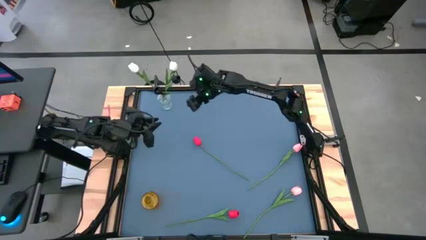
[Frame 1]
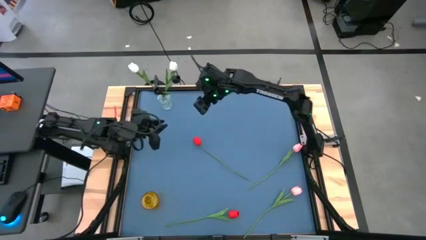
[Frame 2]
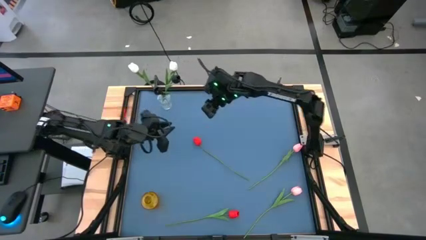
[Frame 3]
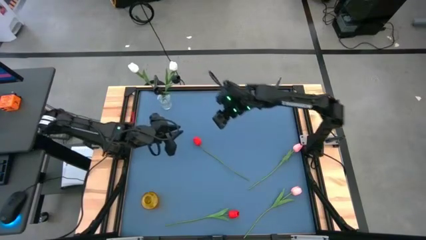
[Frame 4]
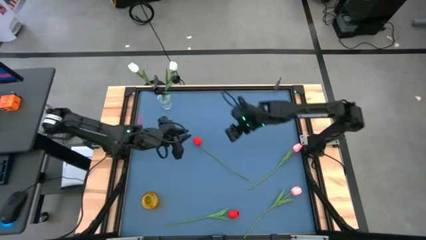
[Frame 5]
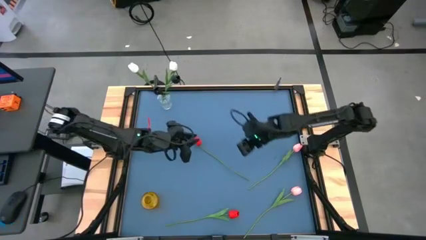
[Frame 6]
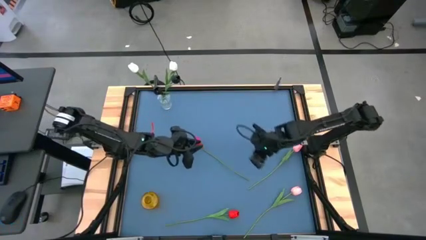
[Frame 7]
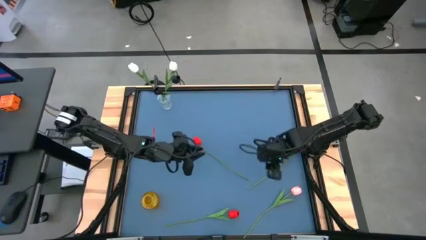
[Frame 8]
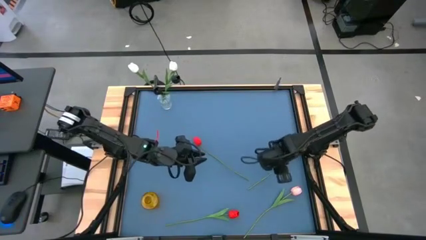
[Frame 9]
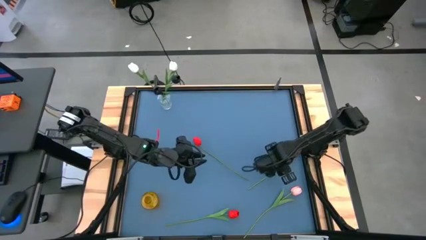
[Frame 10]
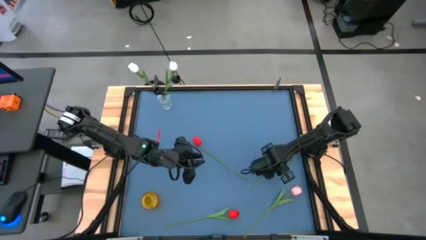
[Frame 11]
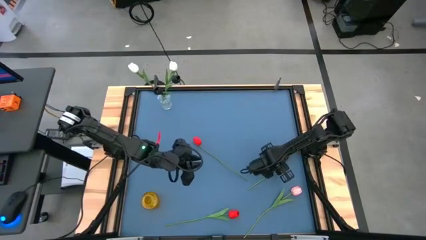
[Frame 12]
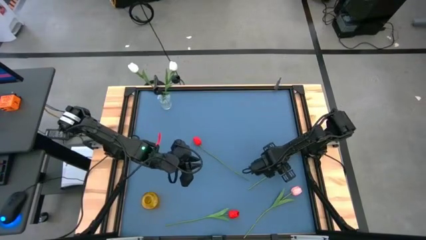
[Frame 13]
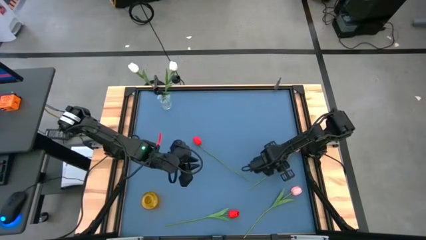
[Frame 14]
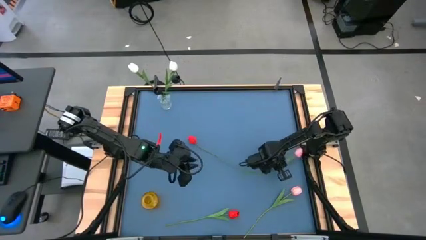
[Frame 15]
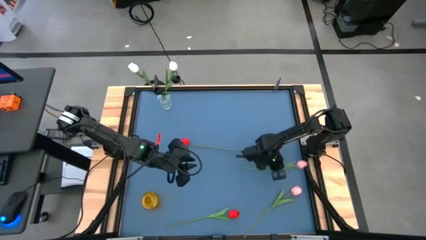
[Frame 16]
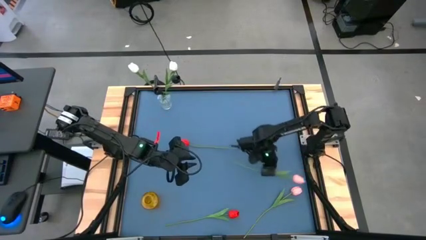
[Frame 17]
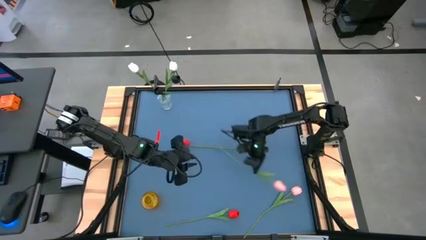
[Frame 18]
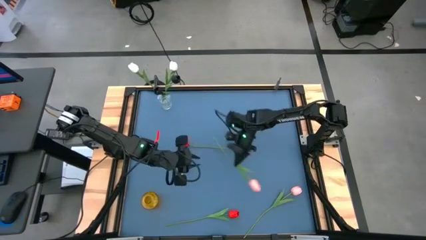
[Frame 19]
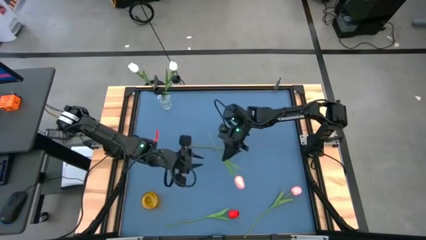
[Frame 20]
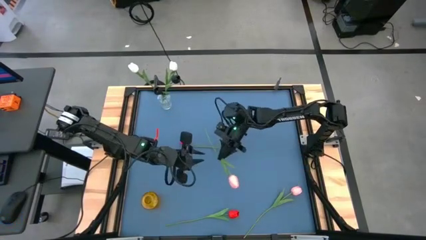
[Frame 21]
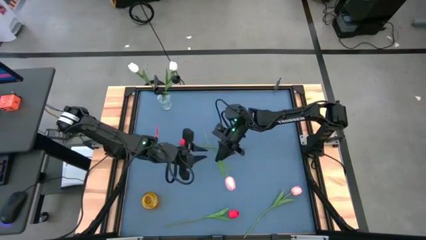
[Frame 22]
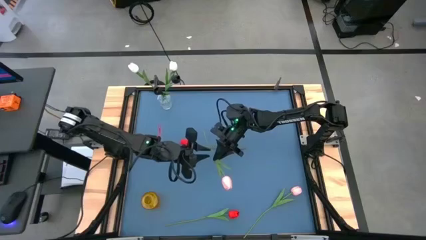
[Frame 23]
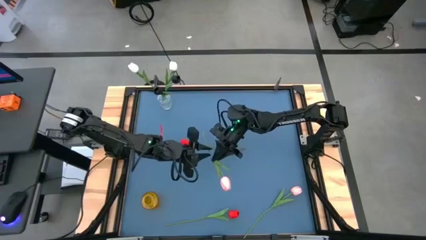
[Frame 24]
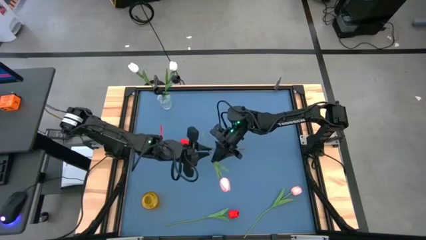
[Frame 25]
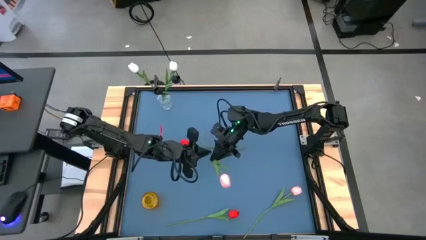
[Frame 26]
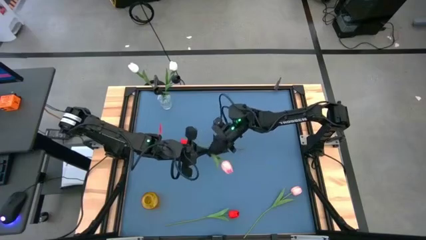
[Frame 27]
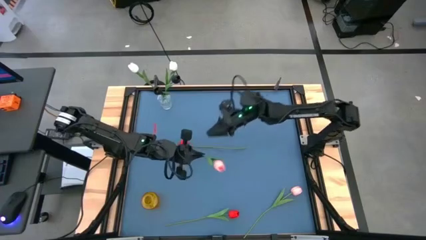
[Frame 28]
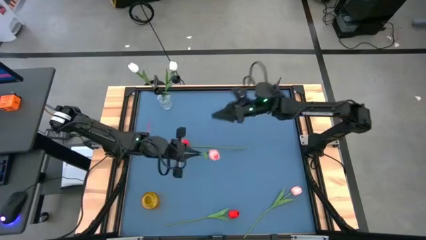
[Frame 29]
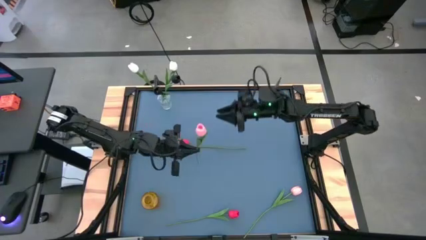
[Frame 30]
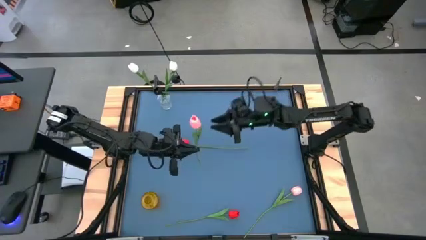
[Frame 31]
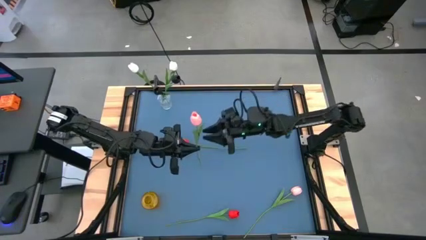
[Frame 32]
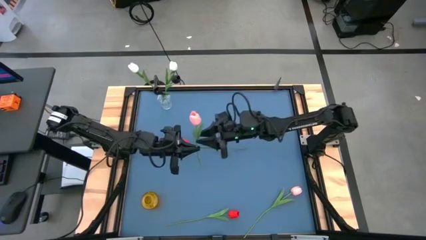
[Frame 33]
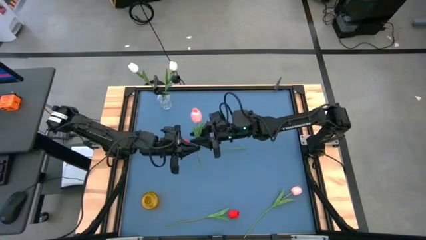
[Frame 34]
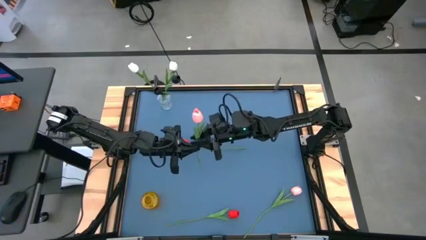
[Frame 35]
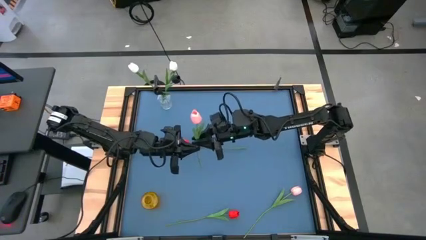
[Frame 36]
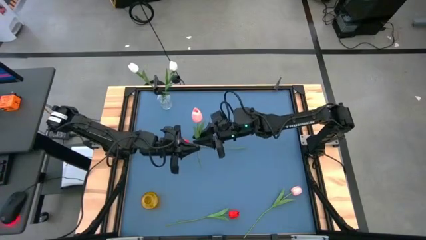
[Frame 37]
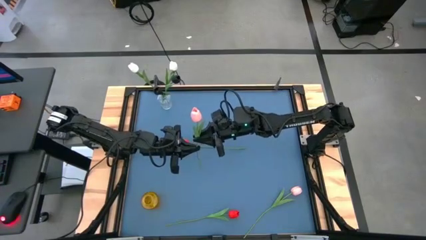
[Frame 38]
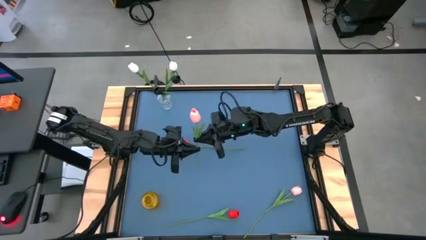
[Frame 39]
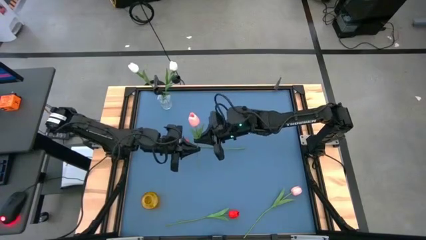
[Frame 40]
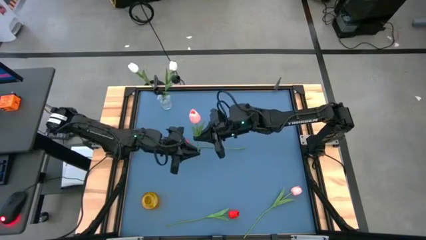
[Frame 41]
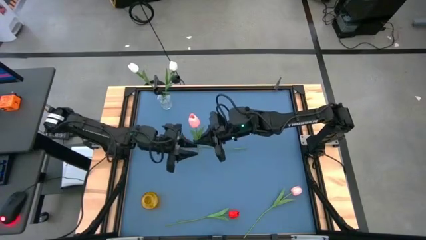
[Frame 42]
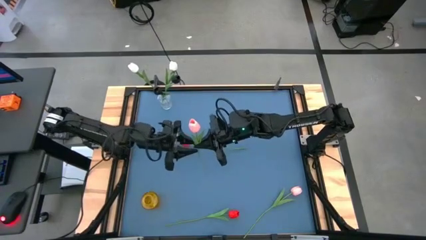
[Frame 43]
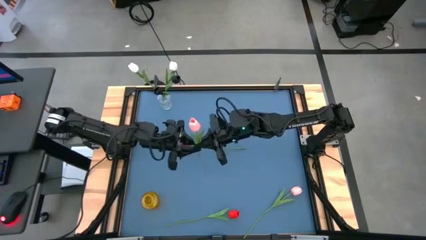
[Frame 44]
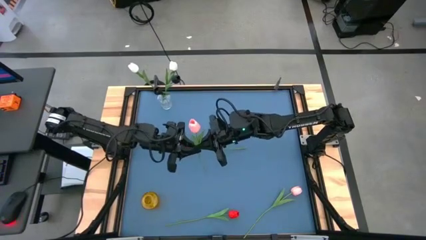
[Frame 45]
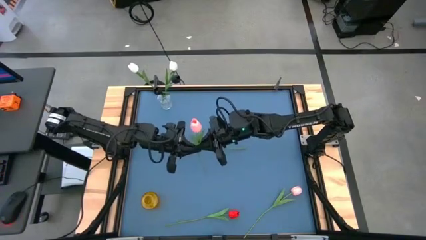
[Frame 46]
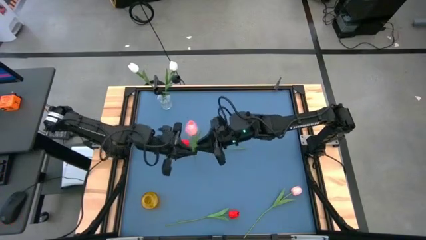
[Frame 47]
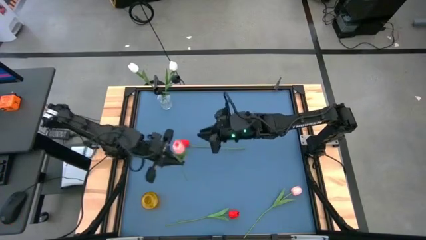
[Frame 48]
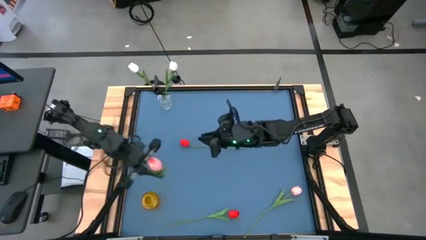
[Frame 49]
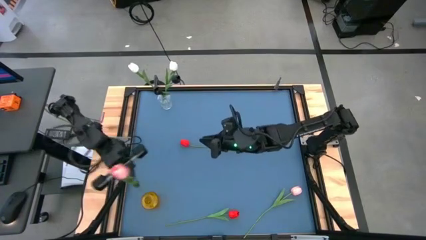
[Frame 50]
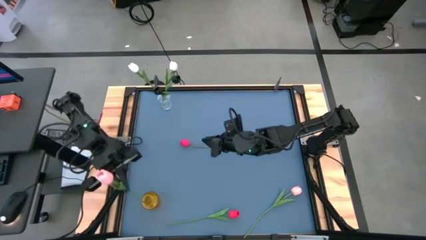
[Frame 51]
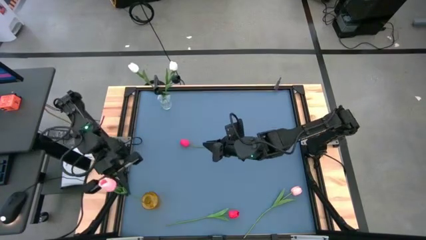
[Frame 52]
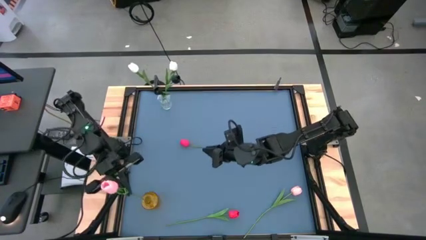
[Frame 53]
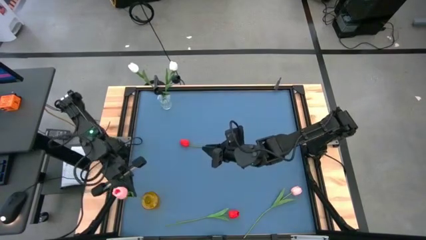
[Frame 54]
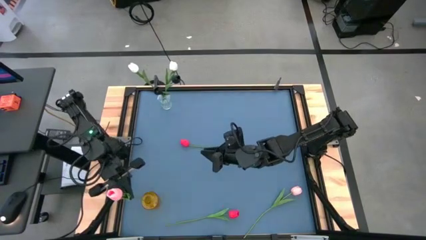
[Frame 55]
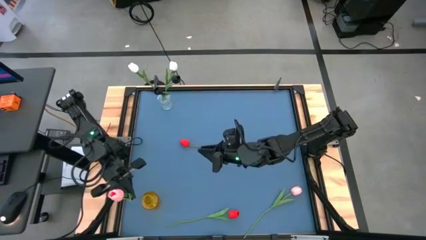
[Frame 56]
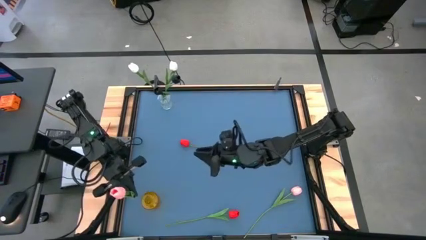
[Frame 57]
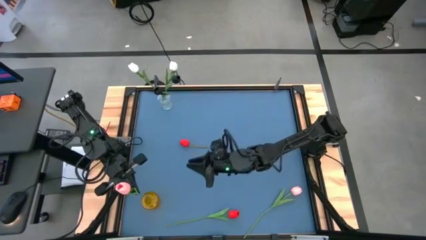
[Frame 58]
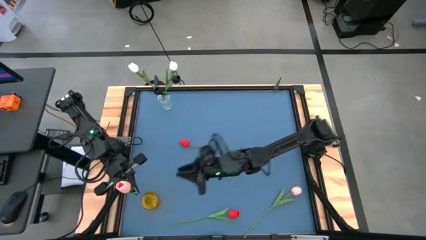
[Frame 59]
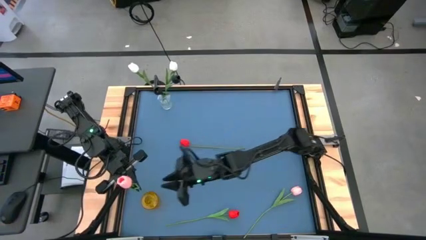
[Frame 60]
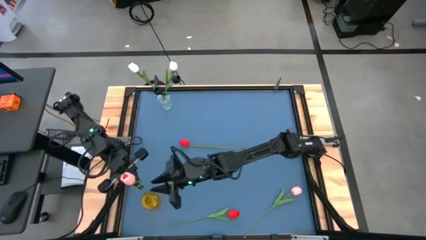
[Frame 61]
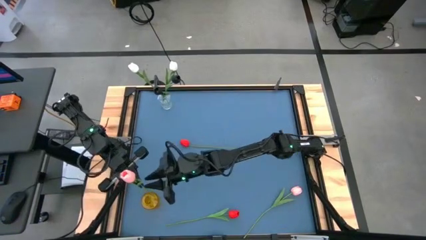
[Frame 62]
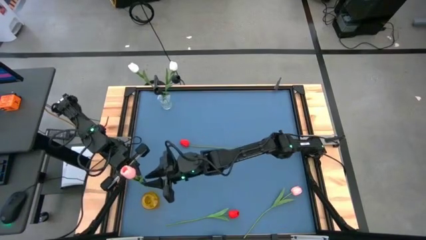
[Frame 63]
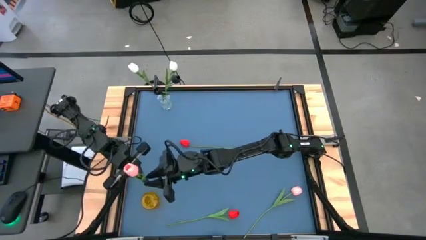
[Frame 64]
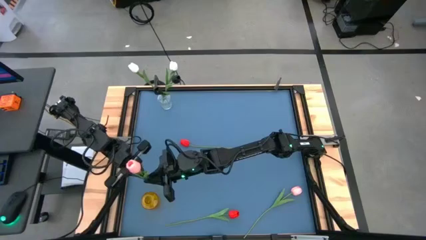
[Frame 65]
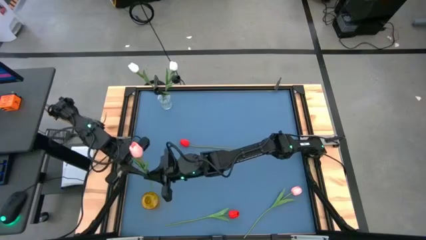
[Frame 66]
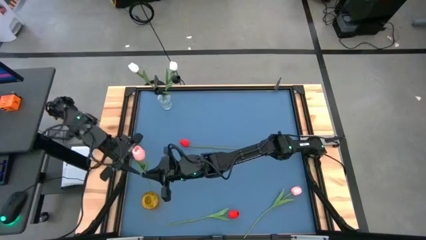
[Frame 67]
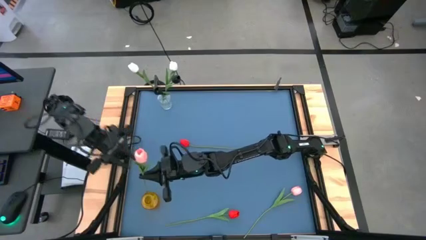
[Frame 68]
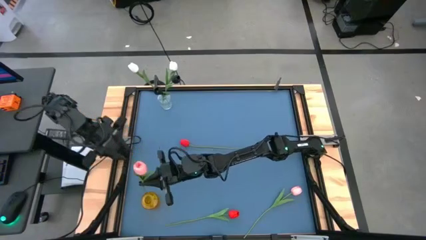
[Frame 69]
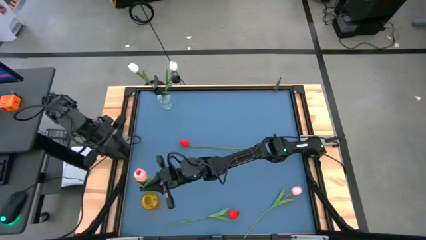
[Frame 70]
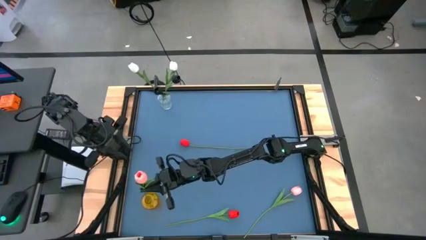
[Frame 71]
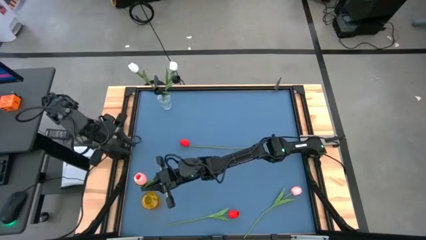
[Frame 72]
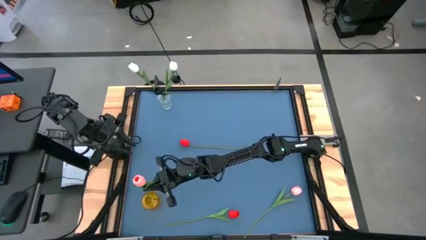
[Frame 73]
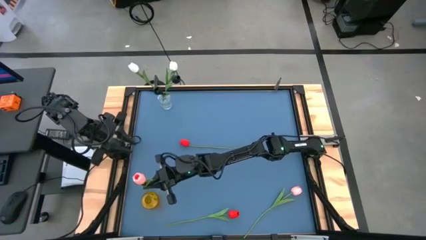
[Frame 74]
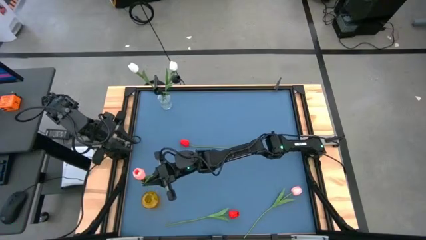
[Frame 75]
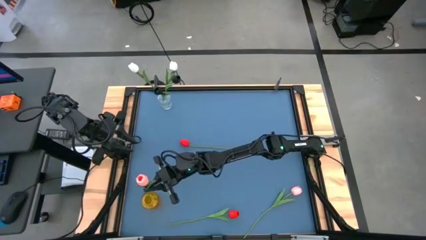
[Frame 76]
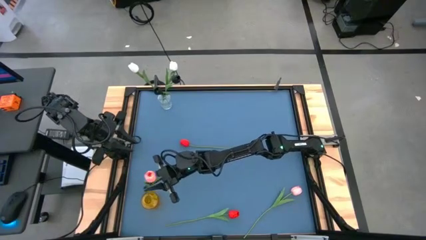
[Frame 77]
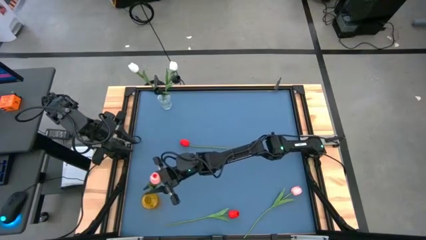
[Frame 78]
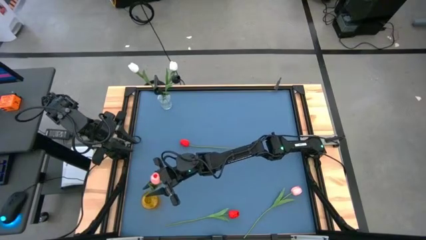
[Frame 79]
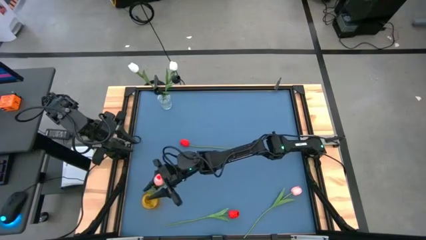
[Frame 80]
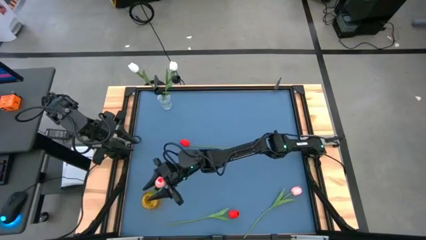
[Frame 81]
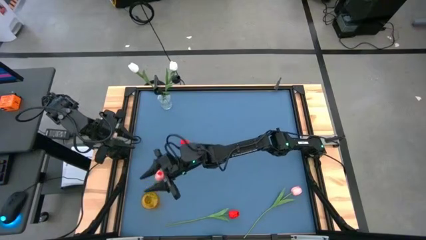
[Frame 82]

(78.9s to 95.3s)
Task: Sort flowers into vase by color
Put the top pink tulip into the yellow vase
